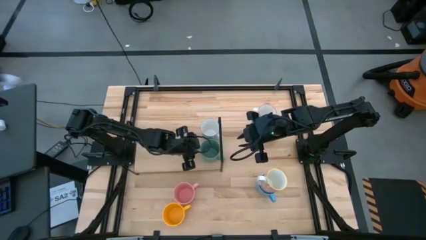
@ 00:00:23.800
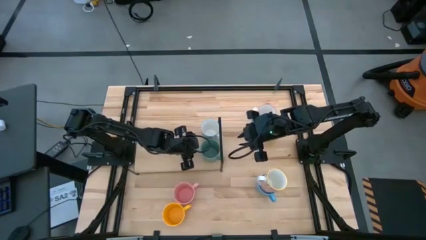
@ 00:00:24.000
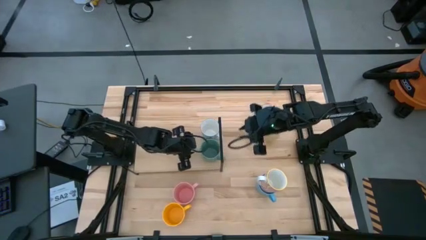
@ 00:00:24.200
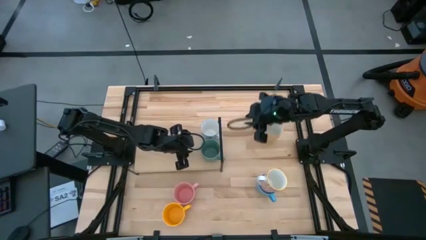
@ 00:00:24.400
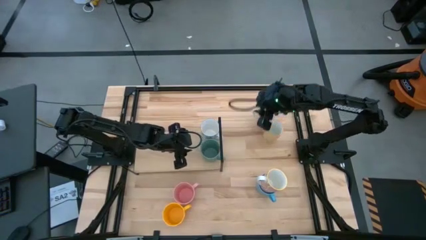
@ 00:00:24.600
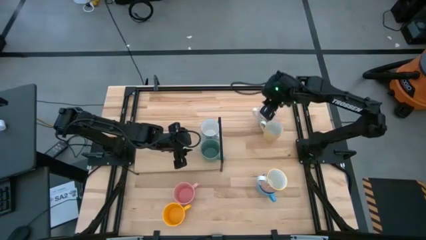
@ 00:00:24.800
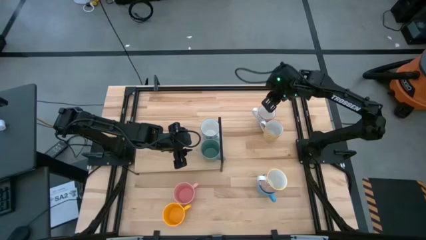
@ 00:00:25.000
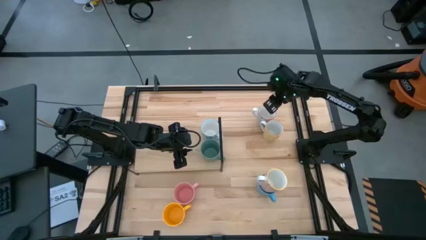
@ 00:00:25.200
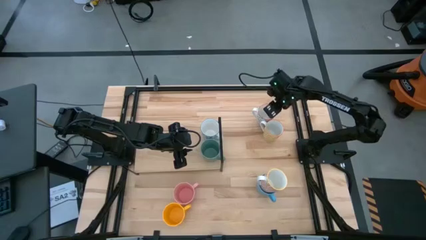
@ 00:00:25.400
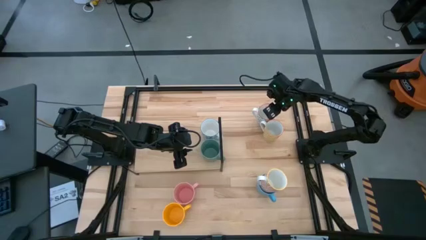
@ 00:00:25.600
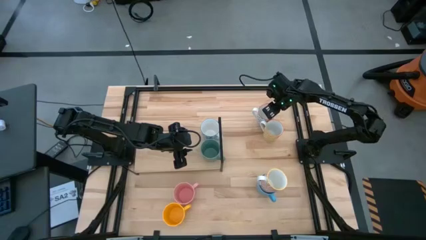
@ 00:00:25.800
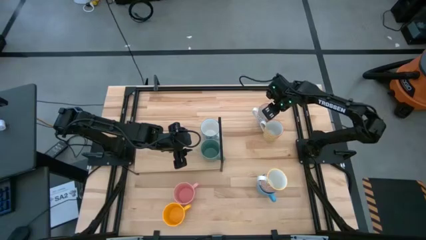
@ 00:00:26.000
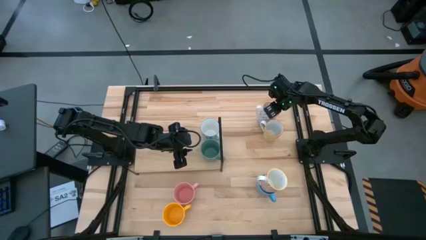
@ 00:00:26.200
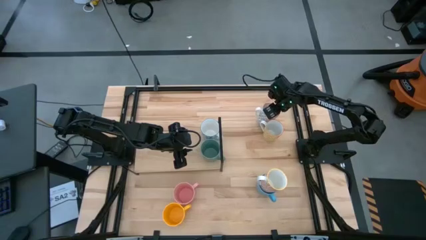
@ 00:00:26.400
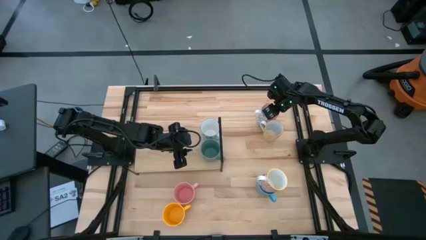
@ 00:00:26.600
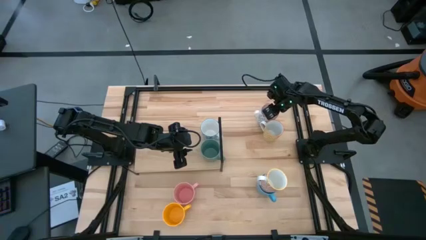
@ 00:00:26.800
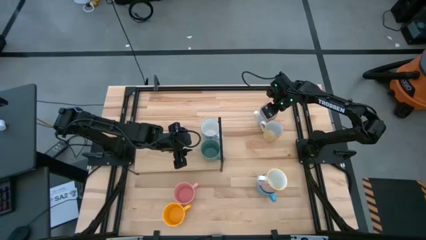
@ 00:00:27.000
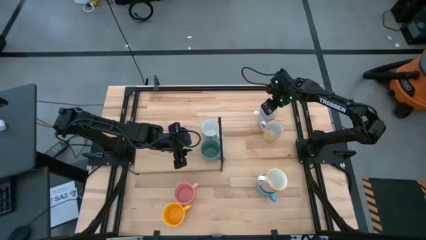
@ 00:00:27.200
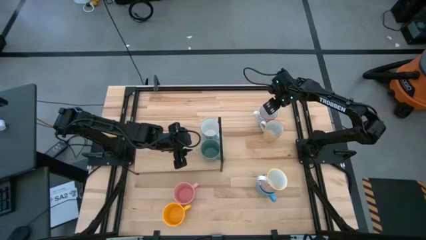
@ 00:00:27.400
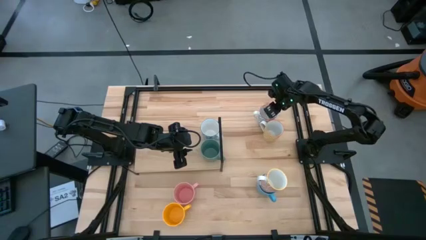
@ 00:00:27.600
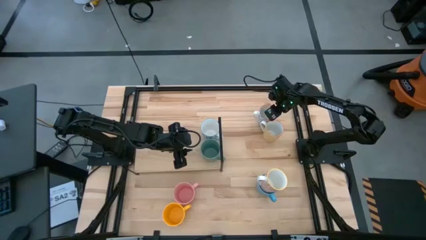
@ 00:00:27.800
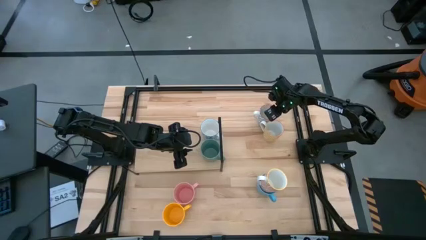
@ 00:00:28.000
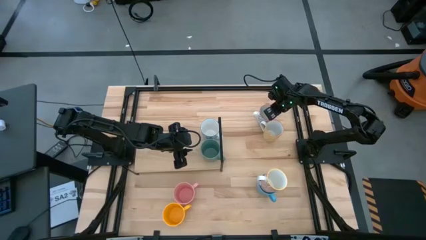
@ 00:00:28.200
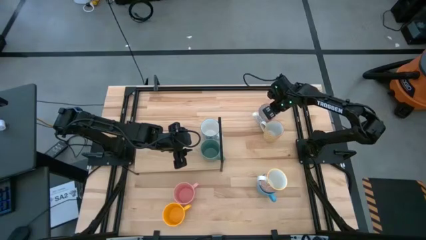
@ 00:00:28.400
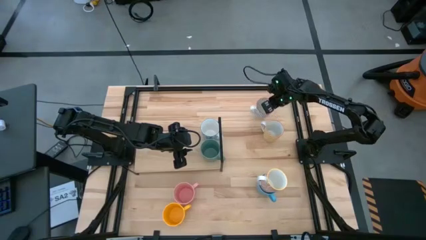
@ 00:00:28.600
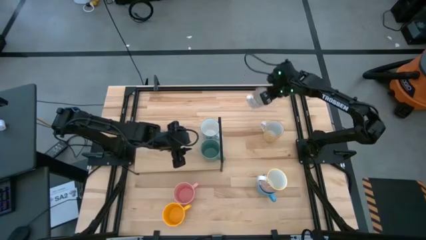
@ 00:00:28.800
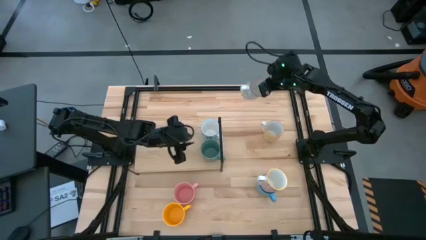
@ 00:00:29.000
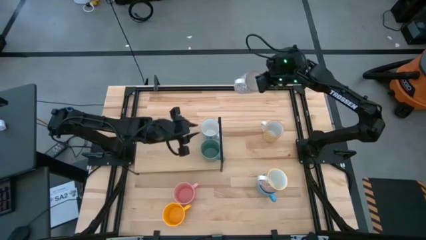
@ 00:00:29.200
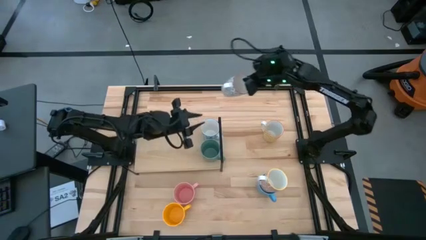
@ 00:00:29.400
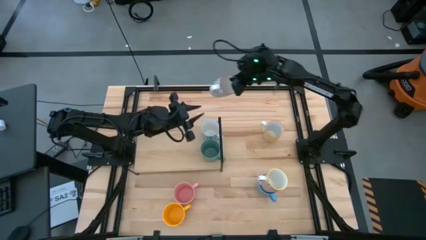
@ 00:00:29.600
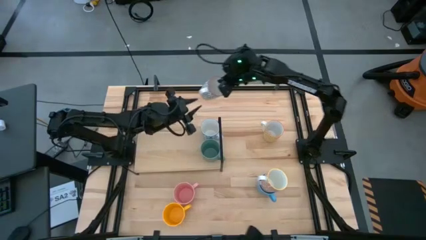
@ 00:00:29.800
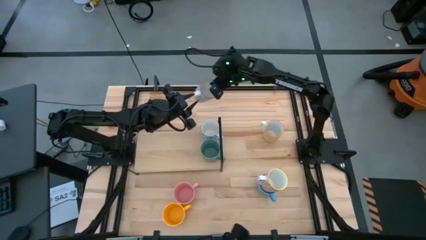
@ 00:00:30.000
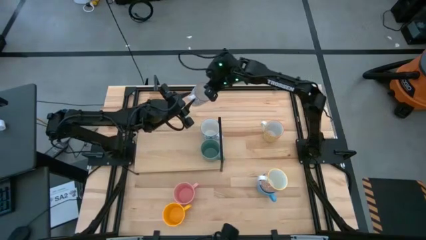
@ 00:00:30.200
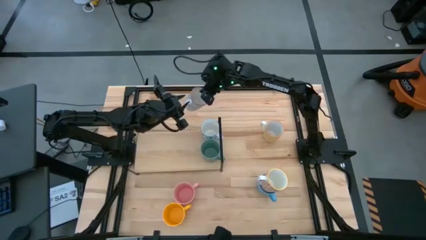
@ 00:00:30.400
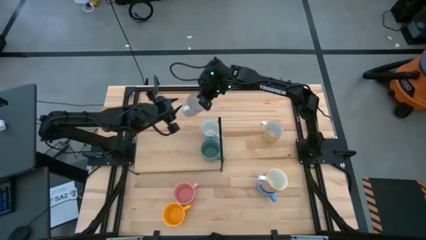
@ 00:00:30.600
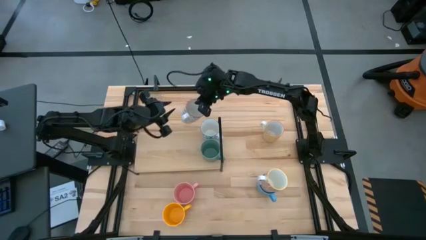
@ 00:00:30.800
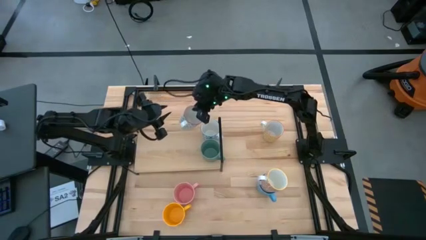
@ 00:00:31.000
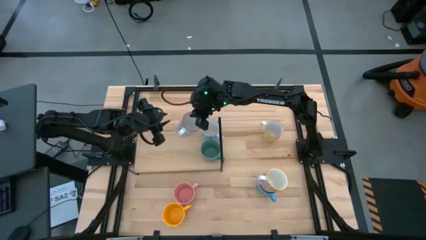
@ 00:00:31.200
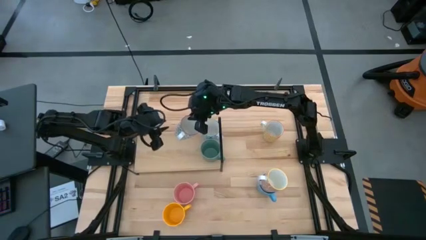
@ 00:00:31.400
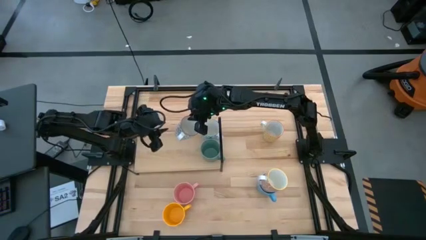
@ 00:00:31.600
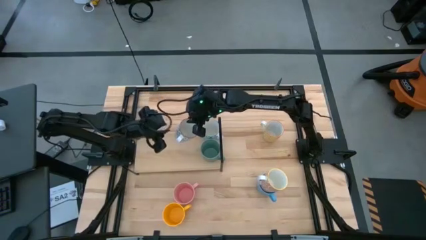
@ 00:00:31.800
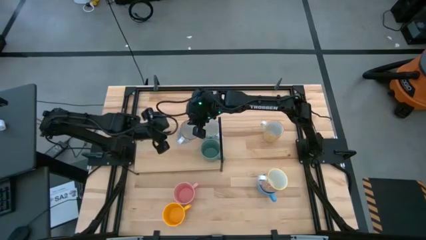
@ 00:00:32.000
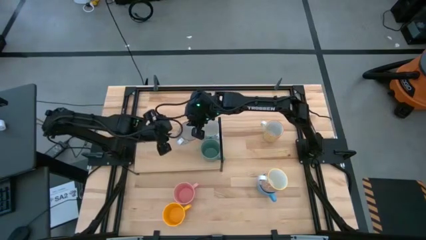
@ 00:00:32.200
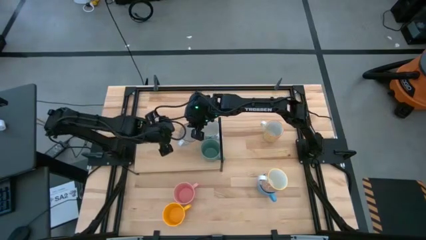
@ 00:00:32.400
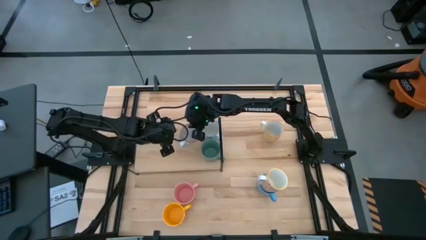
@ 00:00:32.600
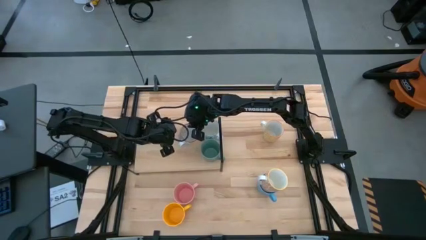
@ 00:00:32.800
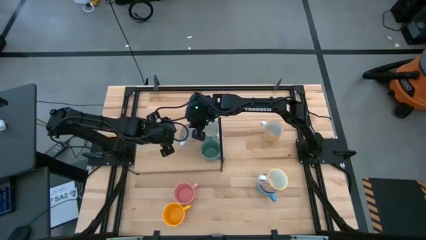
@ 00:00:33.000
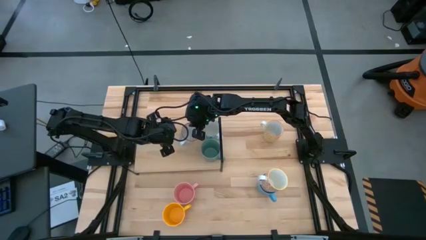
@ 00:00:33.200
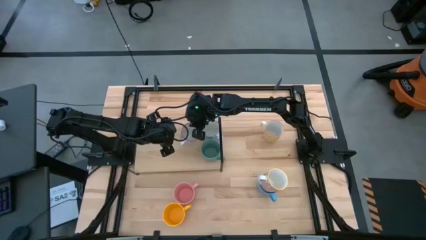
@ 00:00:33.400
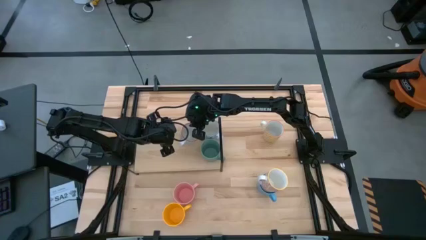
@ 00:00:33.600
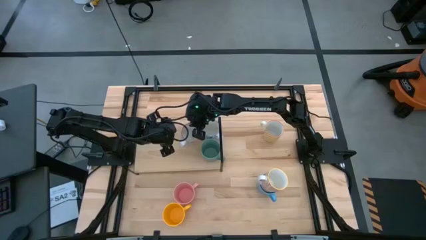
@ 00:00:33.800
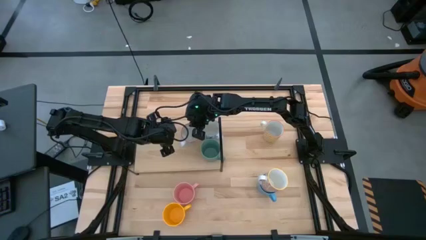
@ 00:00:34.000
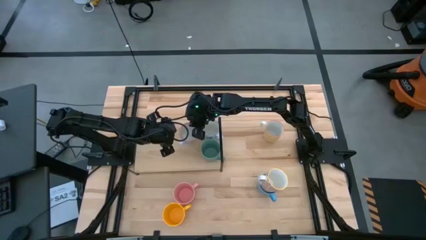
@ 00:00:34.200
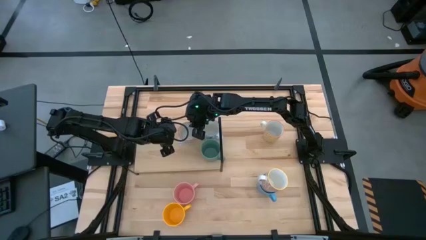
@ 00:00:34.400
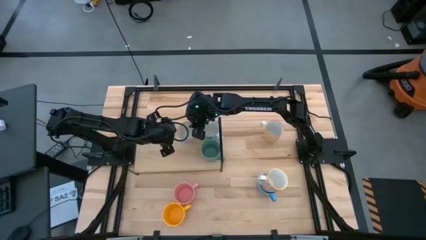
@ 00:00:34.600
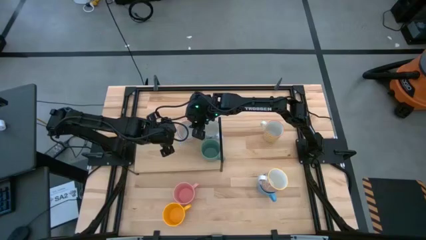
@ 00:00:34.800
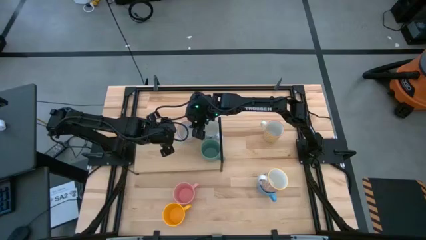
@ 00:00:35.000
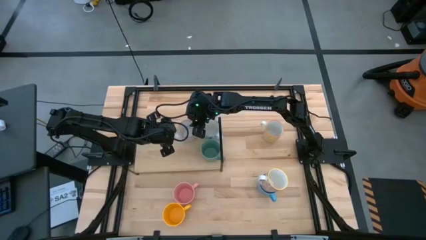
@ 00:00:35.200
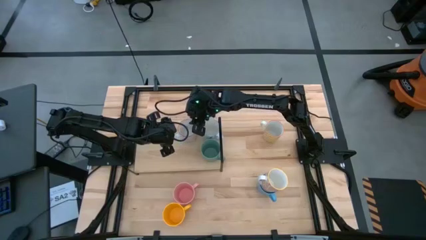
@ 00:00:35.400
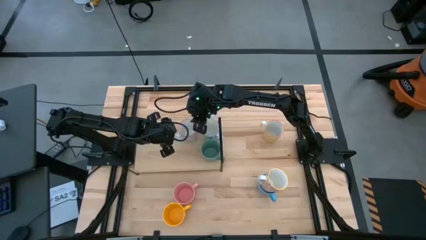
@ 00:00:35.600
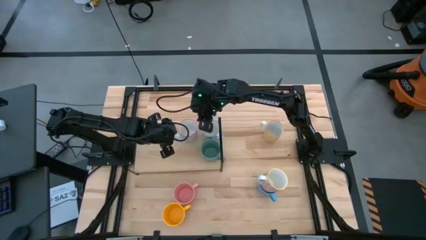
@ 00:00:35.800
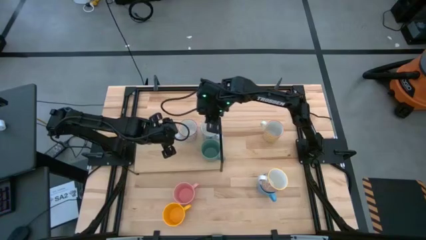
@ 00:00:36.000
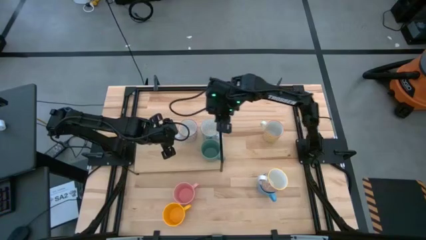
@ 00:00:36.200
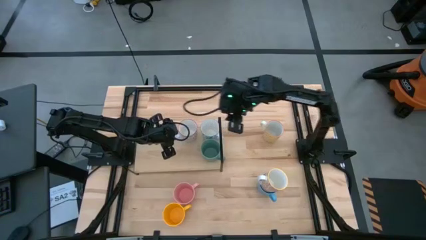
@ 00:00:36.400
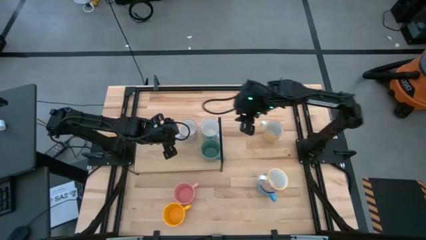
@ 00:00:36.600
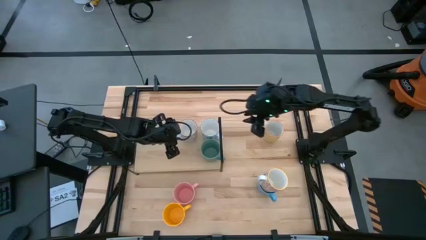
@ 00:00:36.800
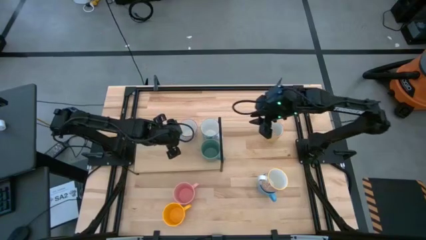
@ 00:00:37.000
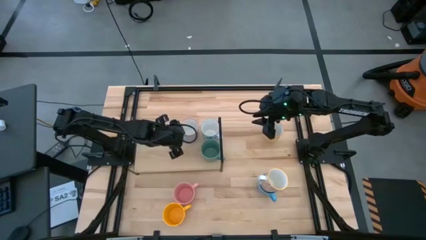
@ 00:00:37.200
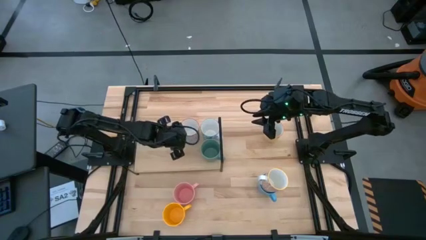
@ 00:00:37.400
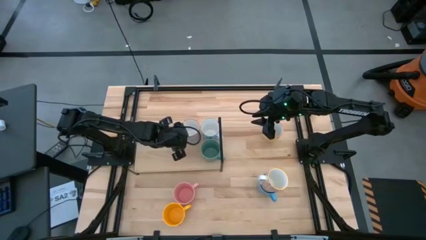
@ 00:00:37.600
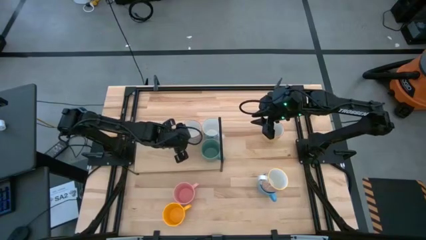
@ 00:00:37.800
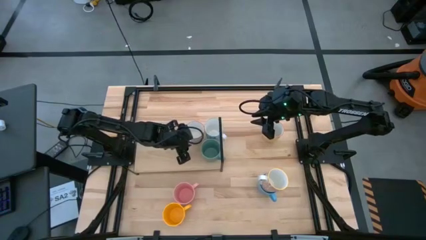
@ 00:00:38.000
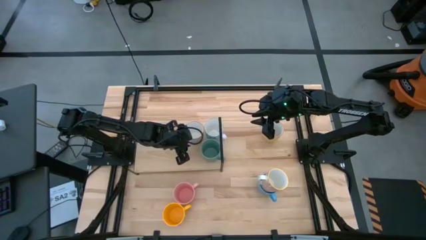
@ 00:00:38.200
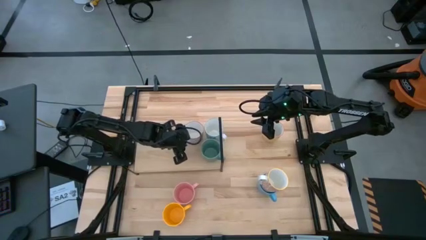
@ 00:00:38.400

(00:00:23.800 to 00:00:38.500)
Task: Place coffee mugs
Put the gray patterned mug on the shelf
